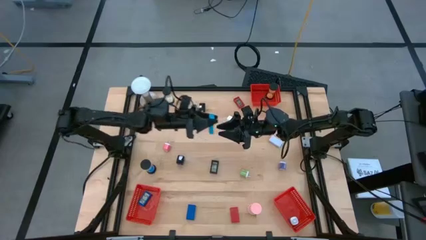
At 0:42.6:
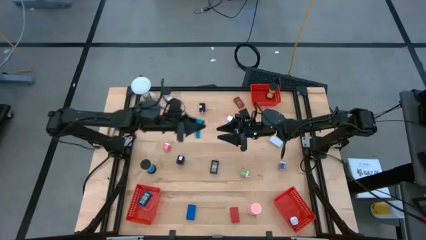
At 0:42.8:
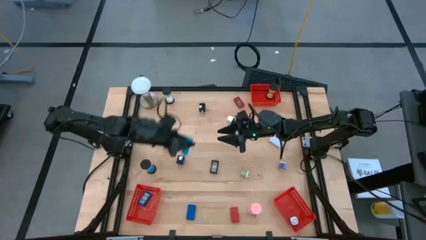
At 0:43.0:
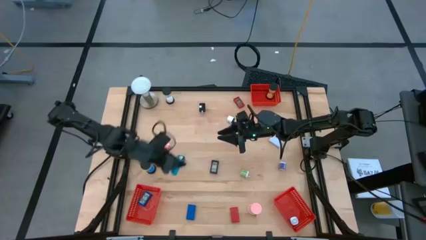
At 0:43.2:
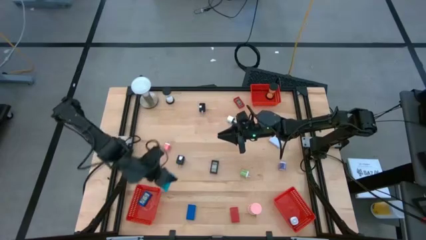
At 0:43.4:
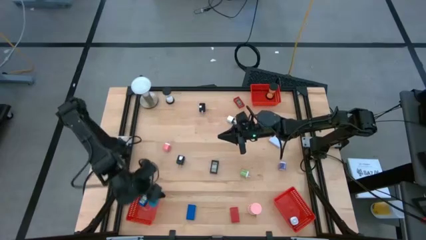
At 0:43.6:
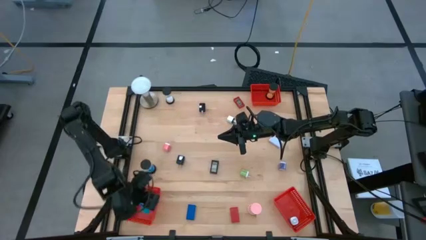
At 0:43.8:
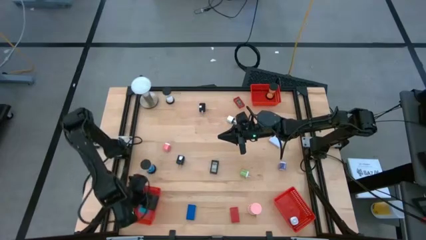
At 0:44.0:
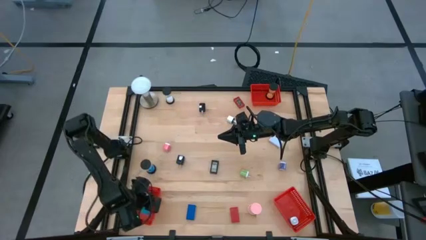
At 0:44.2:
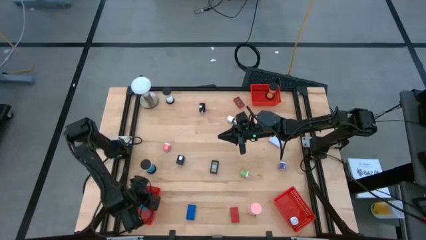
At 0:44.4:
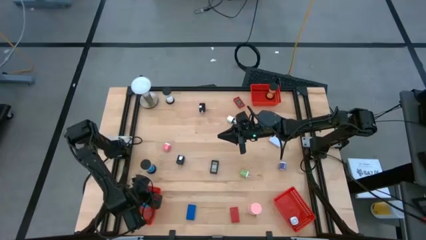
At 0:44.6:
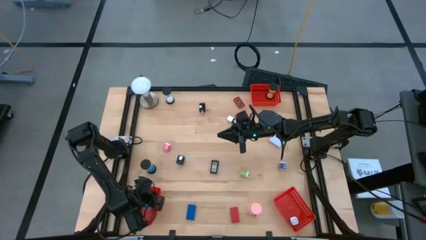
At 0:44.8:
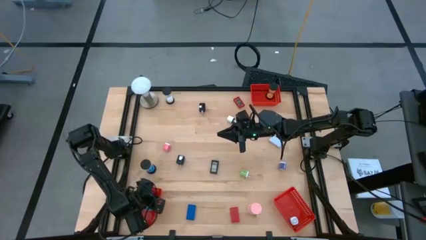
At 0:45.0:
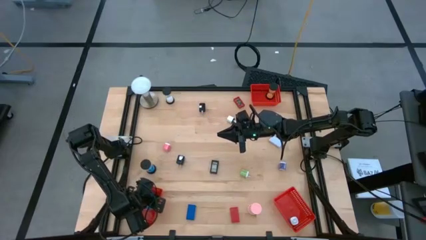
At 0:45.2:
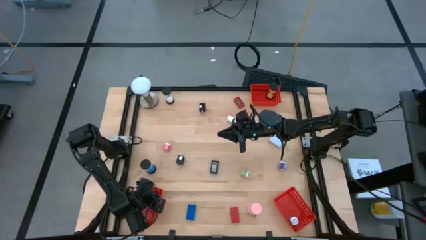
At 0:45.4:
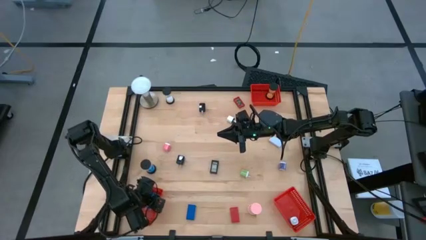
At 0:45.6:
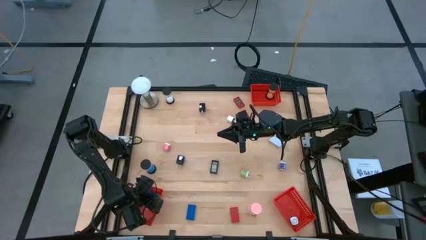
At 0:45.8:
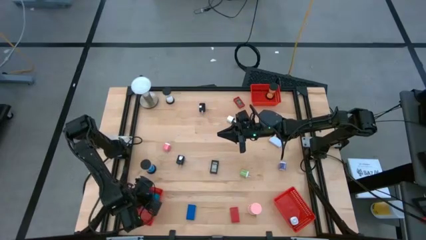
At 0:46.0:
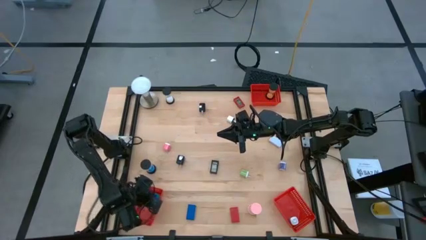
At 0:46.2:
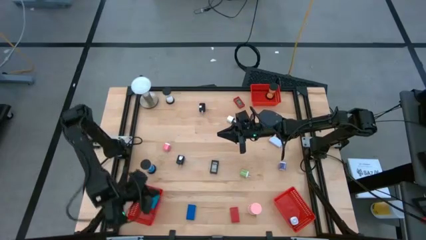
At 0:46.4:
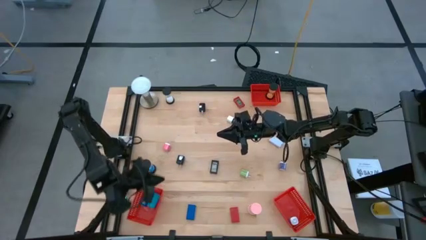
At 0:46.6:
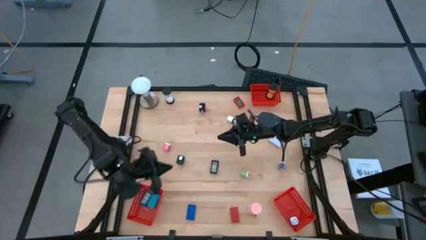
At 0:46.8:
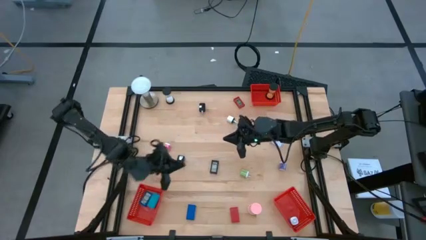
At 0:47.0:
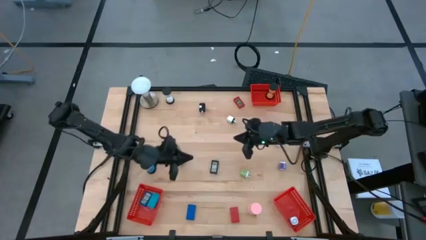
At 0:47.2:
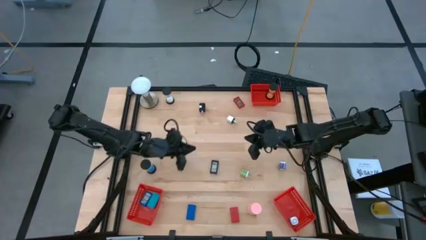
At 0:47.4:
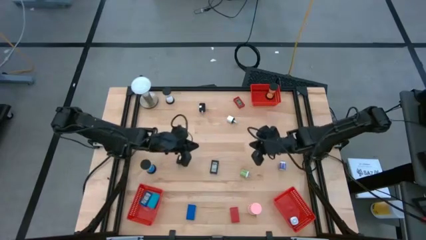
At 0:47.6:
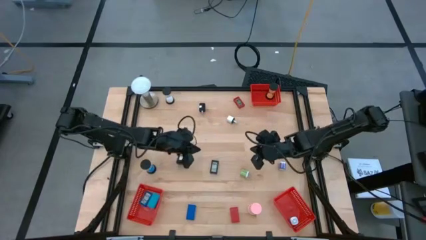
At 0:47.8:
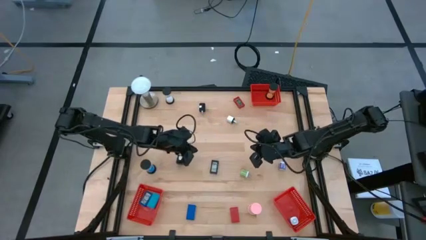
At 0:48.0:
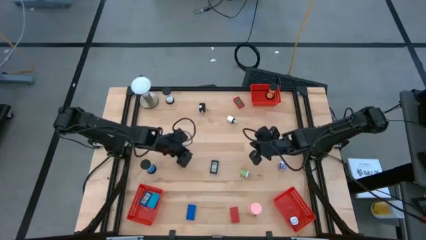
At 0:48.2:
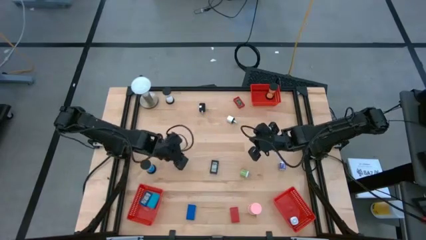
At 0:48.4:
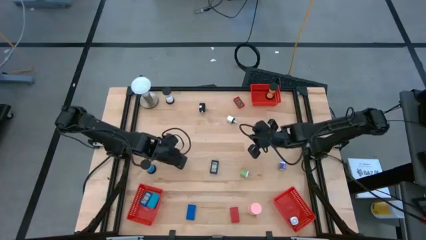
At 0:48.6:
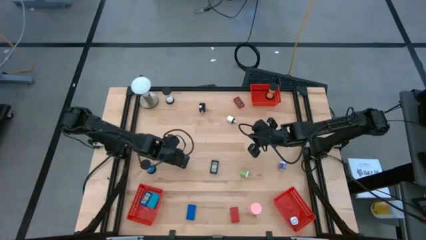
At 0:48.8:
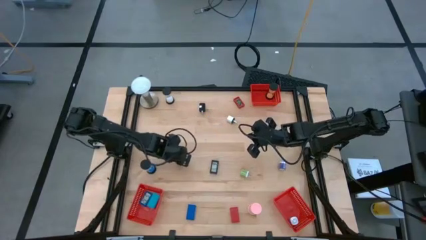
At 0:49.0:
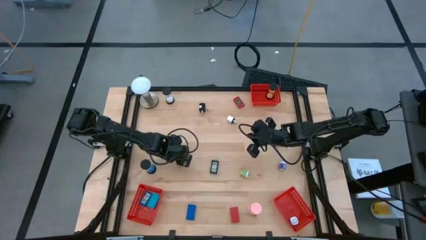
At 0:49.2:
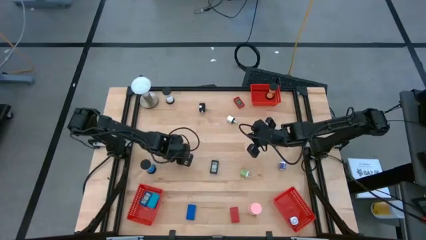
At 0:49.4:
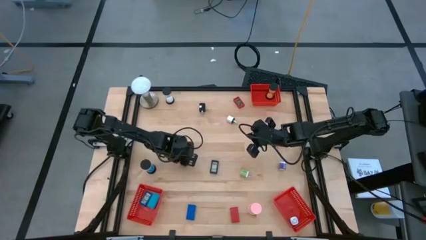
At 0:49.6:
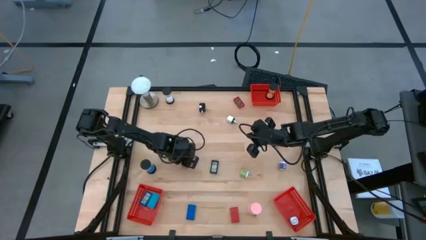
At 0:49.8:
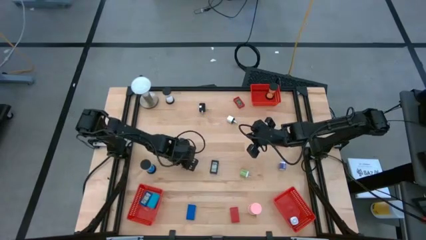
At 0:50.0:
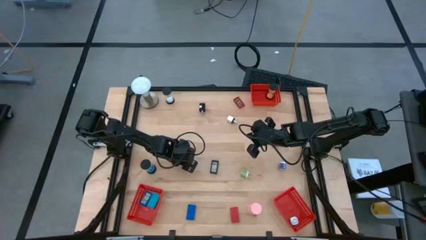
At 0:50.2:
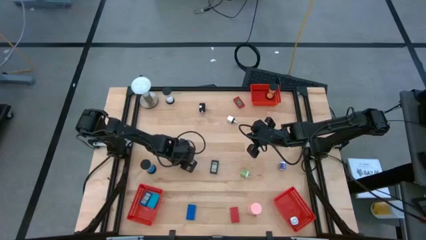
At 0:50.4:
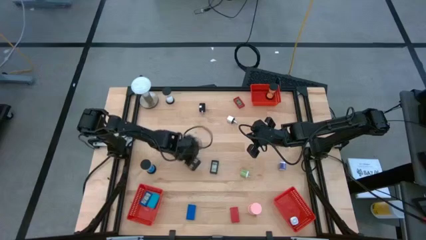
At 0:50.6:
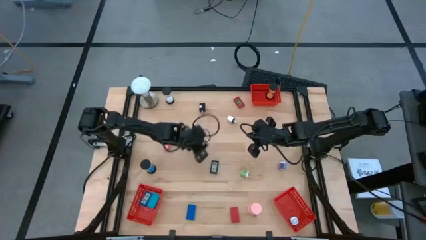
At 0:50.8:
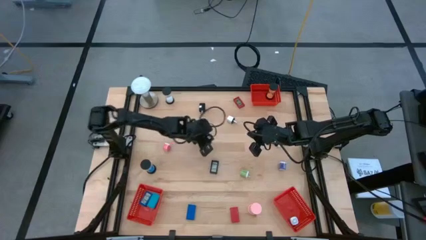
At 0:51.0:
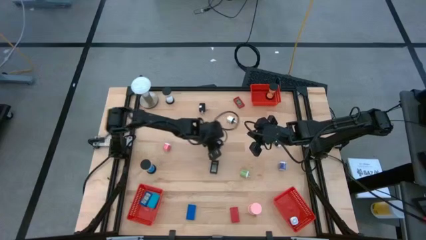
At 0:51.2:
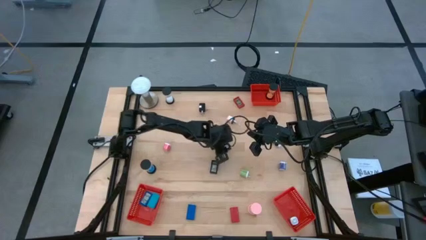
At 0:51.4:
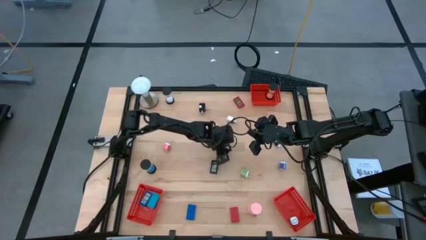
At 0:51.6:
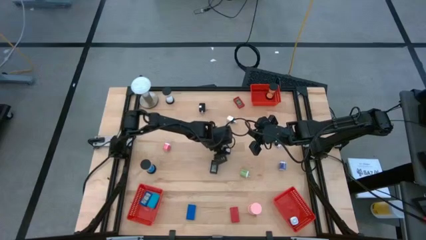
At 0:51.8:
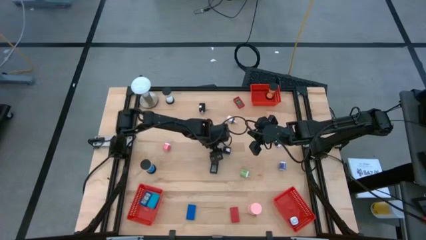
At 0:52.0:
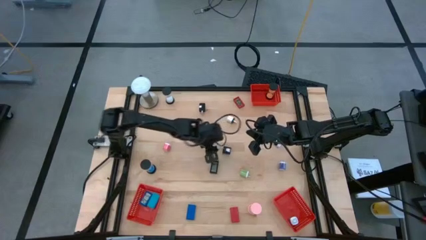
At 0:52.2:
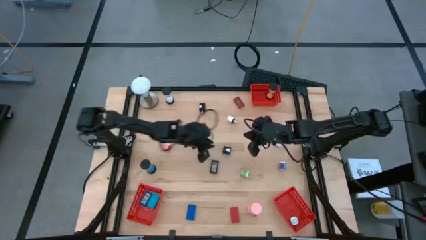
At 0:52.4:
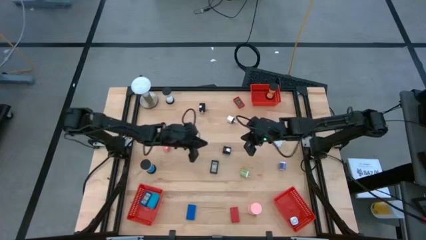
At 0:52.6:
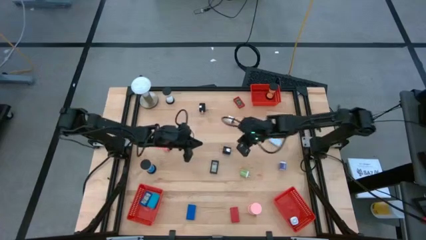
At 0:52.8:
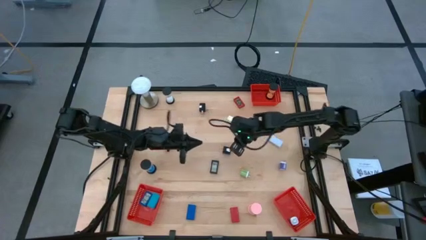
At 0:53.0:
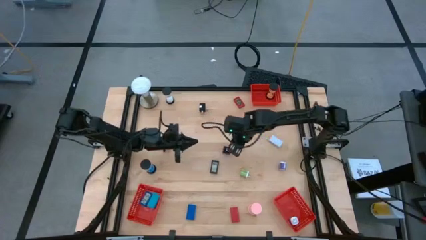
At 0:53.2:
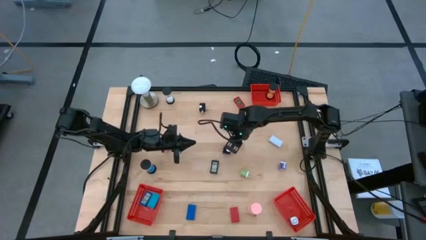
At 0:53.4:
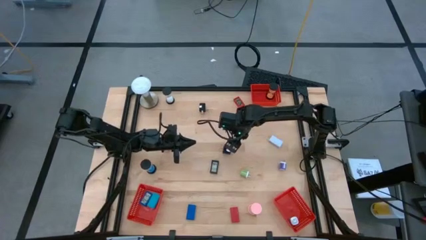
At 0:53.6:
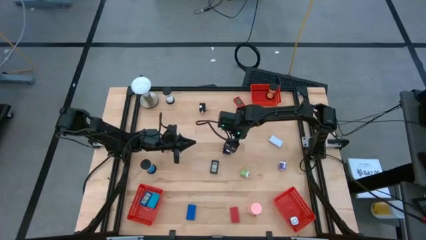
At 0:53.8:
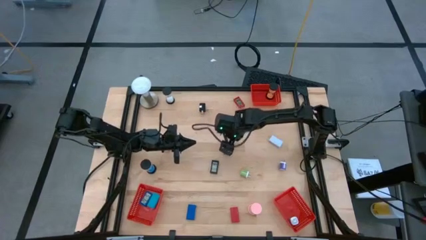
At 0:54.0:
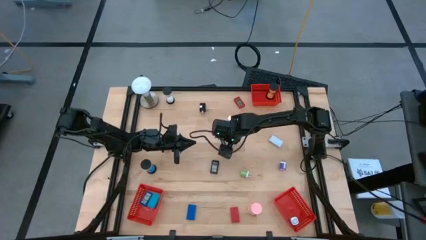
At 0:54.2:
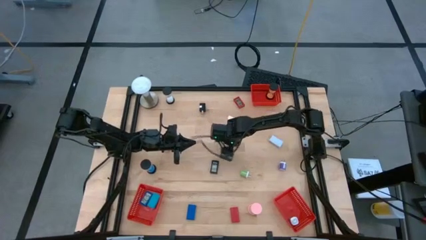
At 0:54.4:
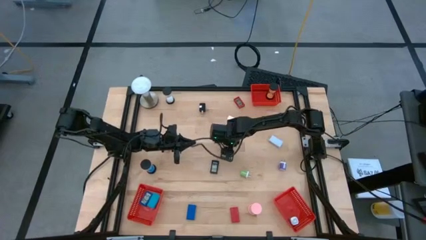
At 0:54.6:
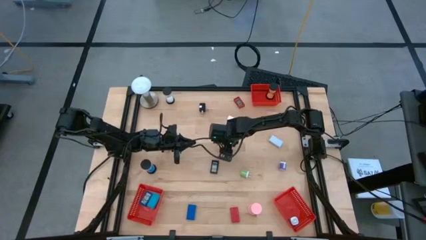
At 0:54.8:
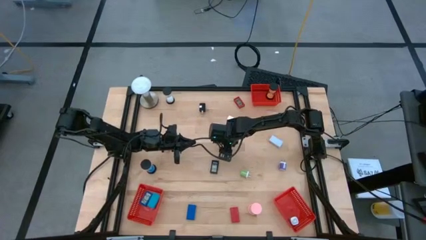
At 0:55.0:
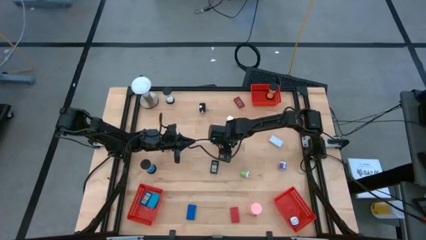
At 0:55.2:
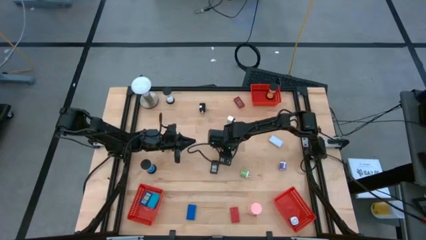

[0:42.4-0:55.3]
Task: Pick & Place Office items
Put the bottom black charger adapter into the bottom right red basket

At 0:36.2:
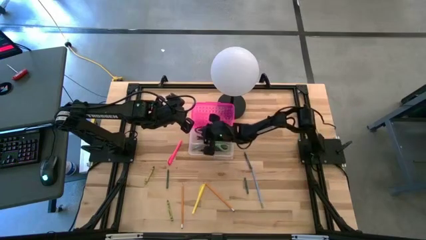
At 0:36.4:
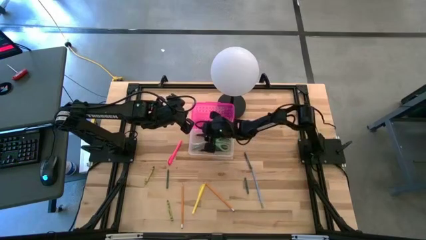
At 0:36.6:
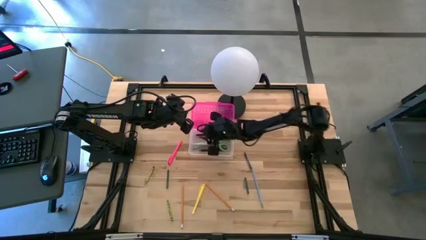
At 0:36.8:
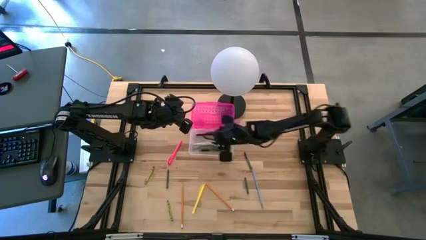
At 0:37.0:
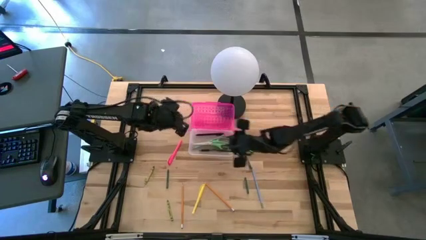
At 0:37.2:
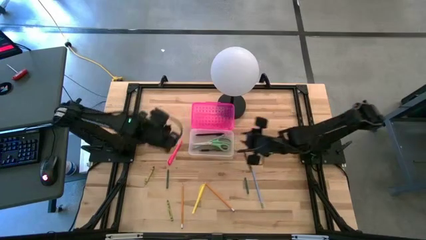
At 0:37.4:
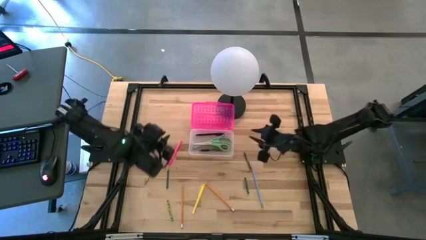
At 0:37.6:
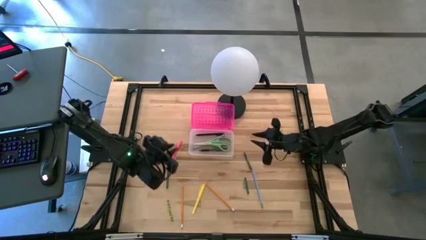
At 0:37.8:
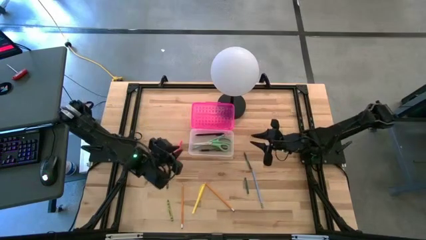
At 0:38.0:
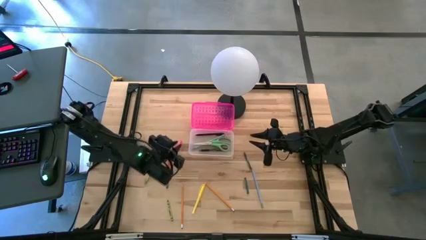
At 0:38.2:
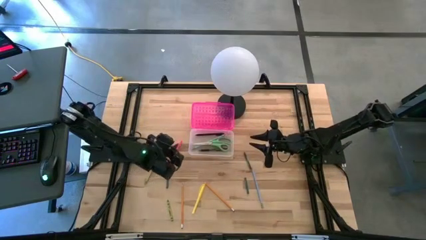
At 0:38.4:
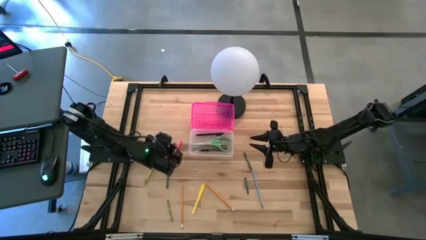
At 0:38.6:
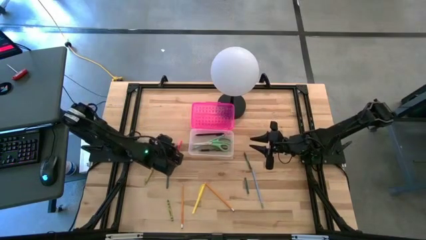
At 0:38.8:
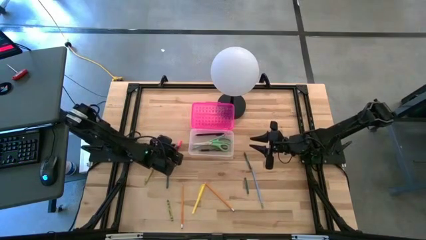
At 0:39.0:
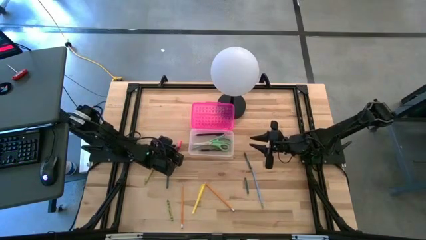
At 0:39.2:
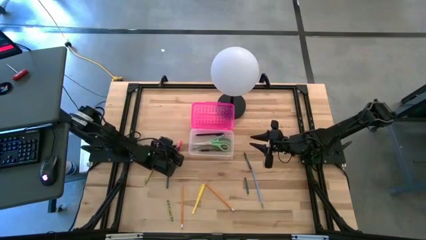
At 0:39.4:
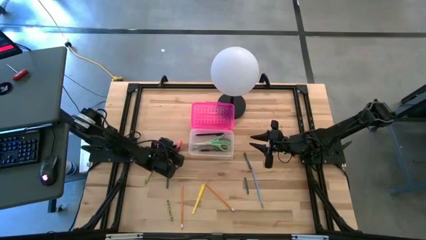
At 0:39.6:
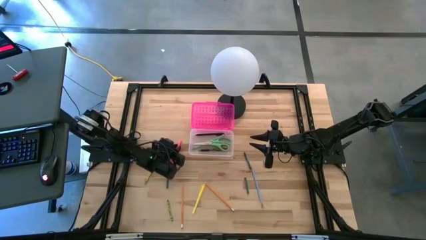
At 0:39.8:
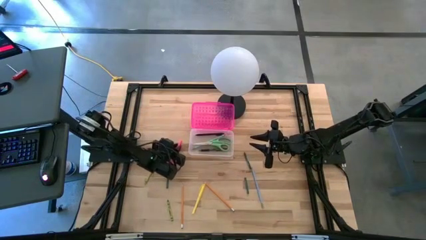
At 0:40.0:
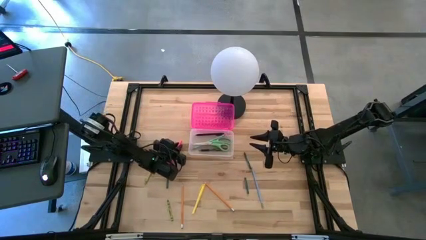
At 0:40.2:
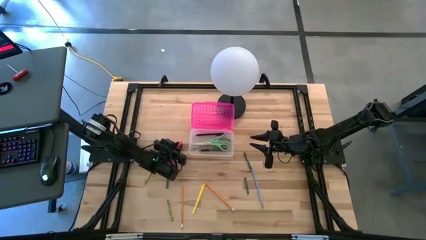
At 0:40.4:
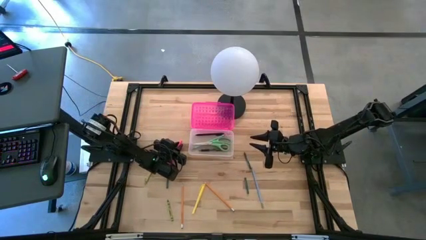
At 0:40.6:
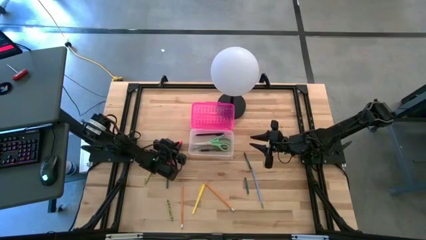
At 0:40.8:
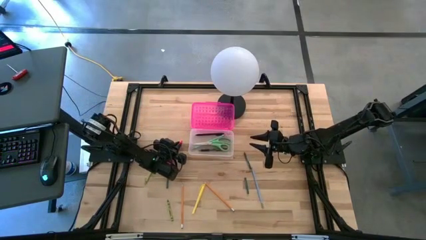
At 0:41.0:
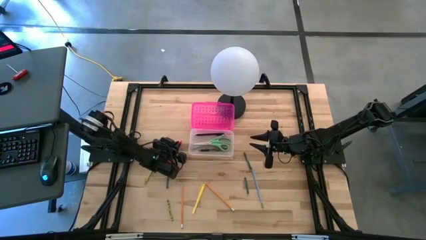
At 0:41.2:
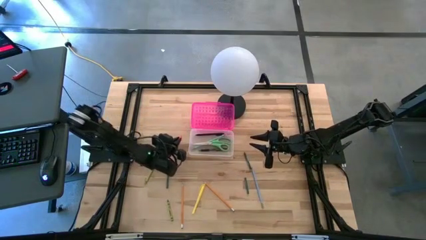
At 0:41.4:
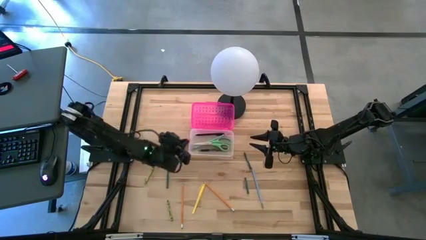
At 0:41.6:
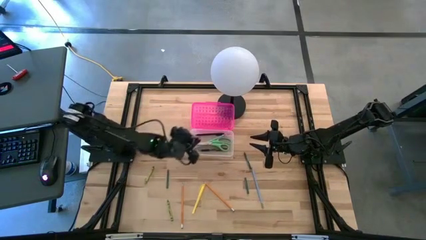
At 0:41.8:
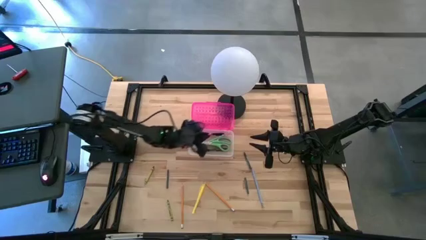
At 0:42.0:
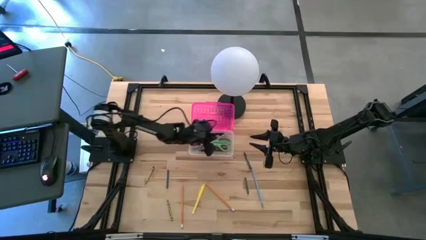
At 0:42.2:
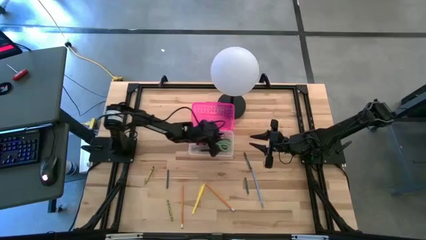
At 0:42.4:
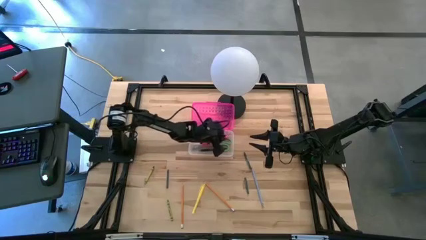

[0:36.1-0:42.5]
Task: Pick & place school supplies into a supply box
Put the pink pen into the pink supply box
